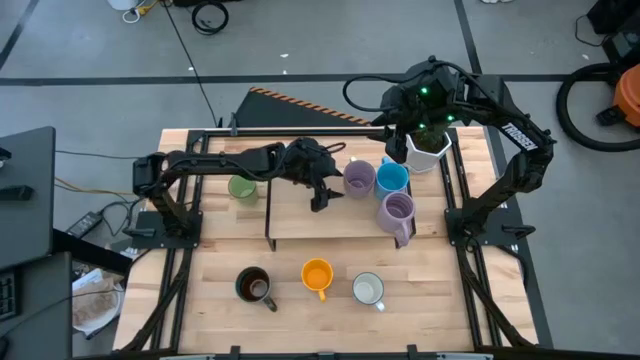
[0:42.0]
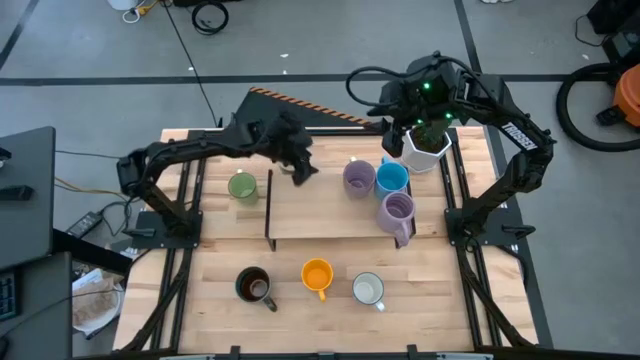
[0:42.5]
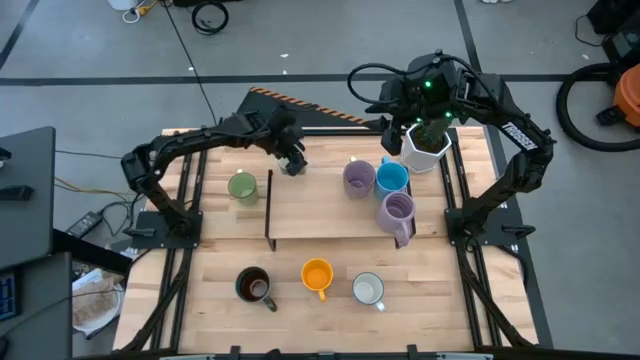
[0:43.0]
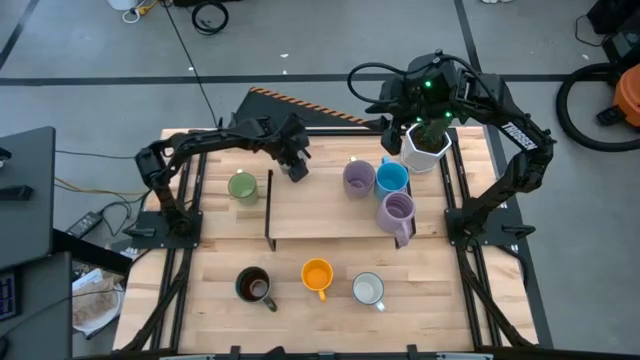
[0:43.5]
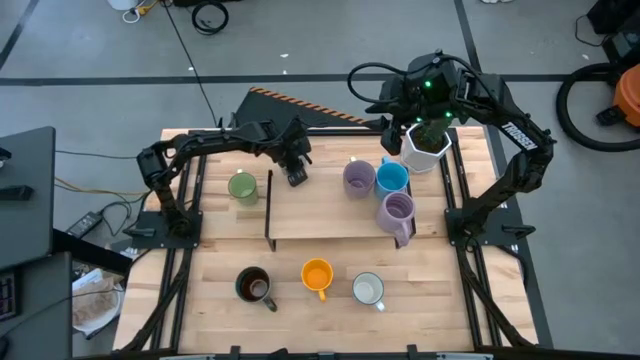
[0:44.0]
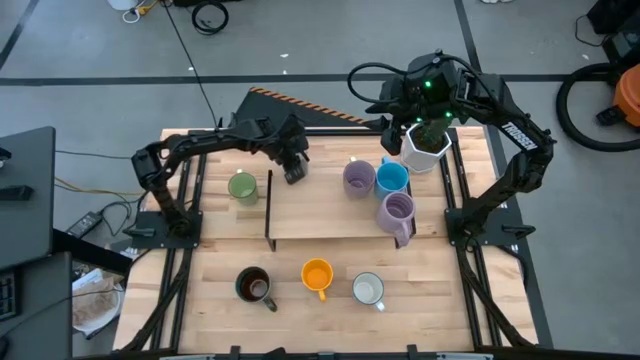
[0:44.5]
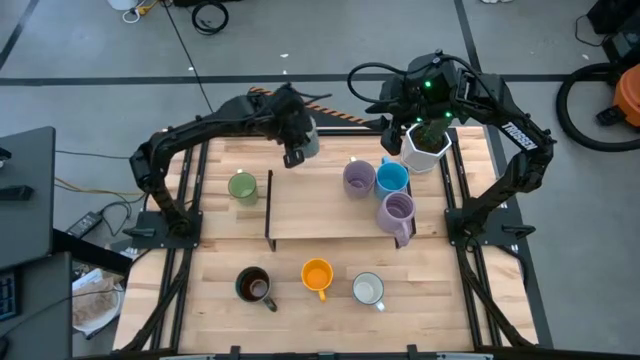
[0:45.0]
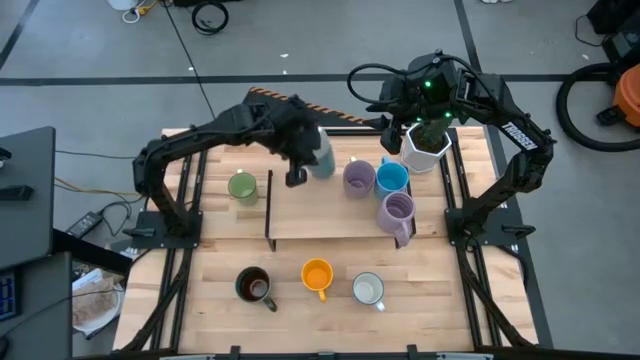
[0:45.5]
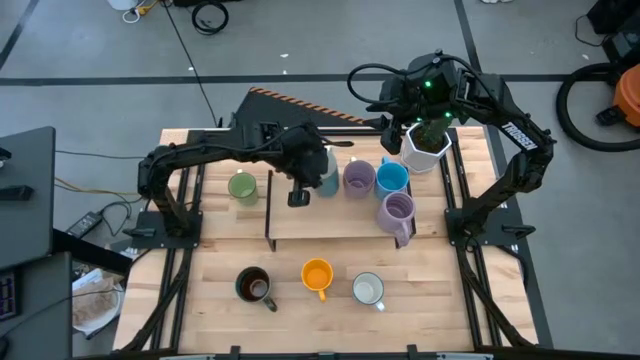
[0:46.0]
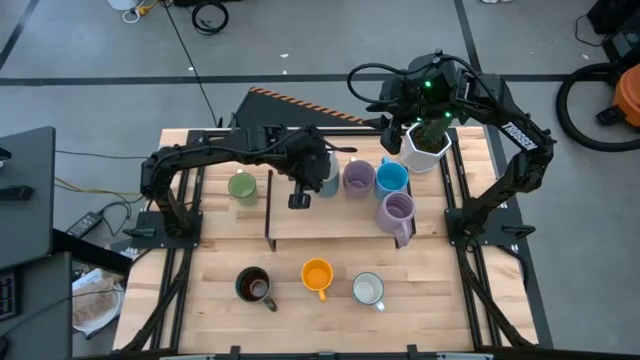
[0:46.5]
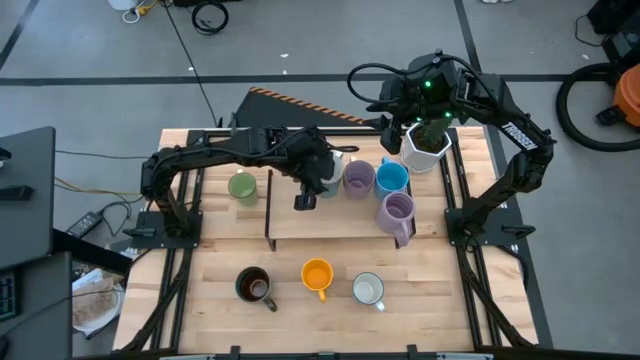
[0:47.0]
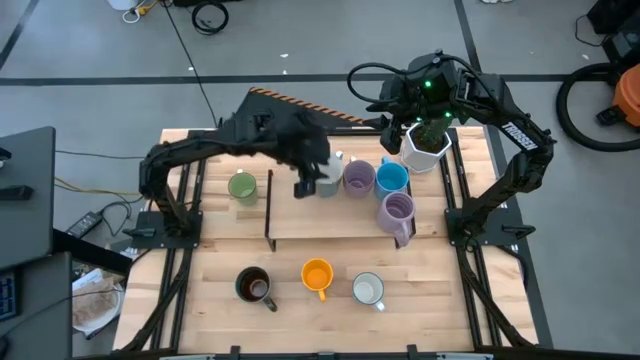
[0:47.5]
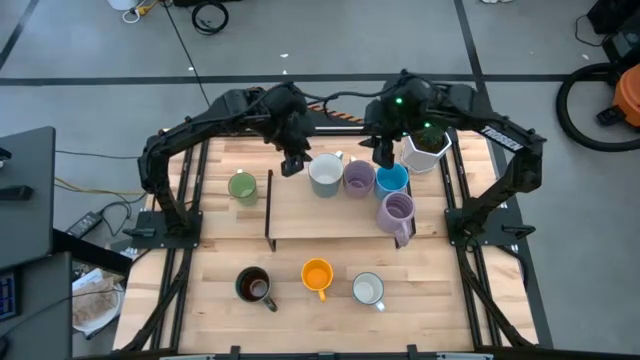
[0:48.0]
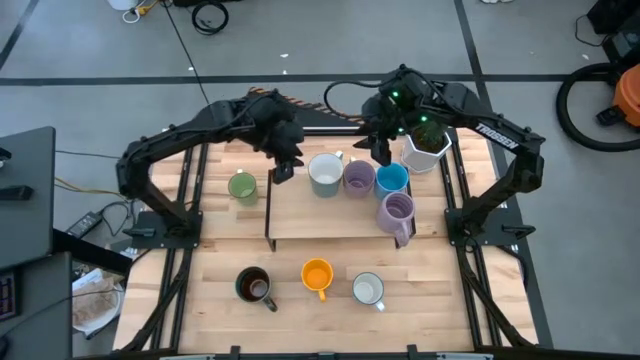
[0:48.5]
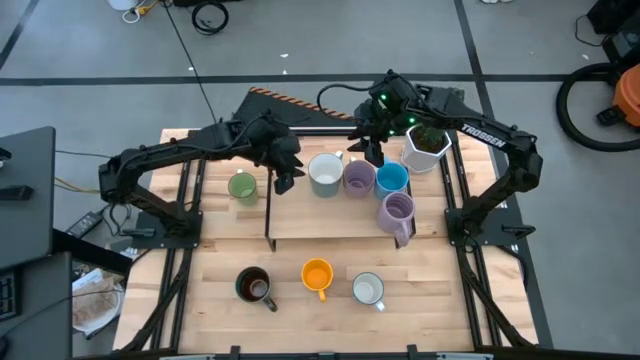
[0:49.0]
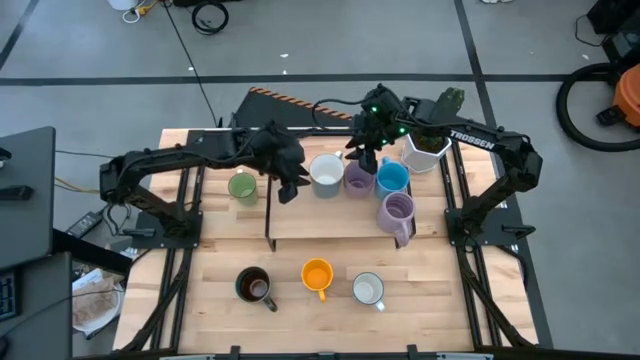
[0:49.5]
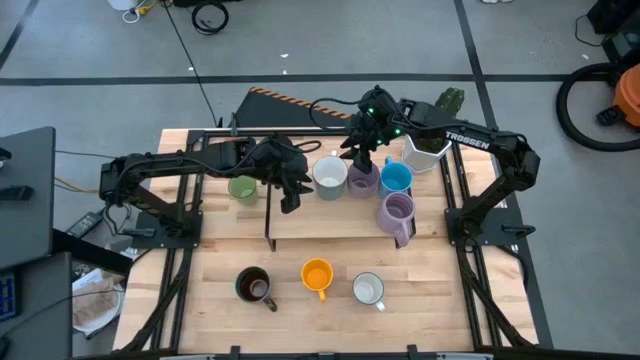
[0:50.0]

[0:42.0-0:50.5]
Task: Place coffee mugs
Put the light blue mug on the shelf

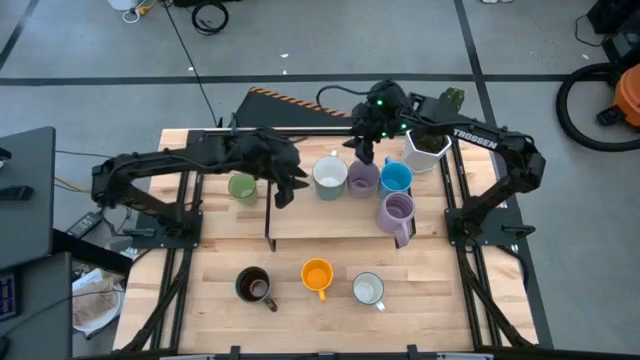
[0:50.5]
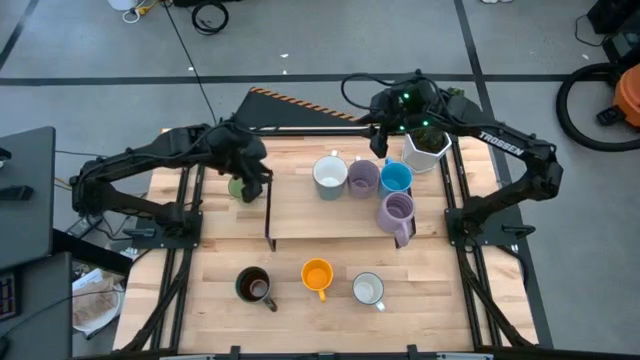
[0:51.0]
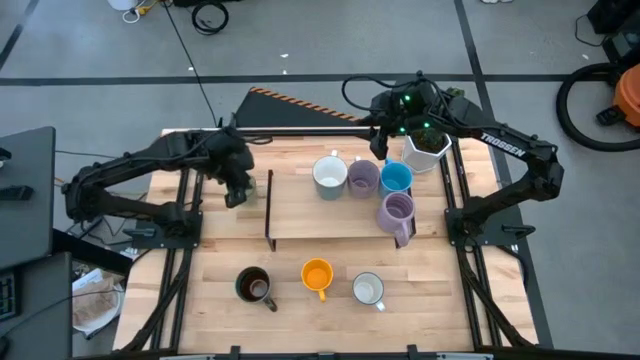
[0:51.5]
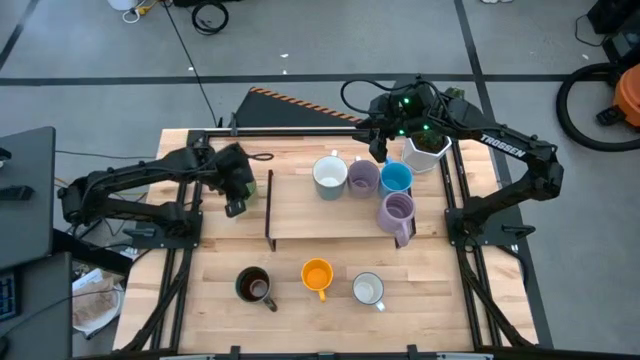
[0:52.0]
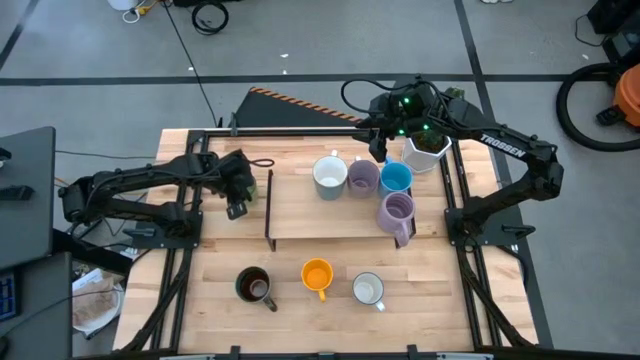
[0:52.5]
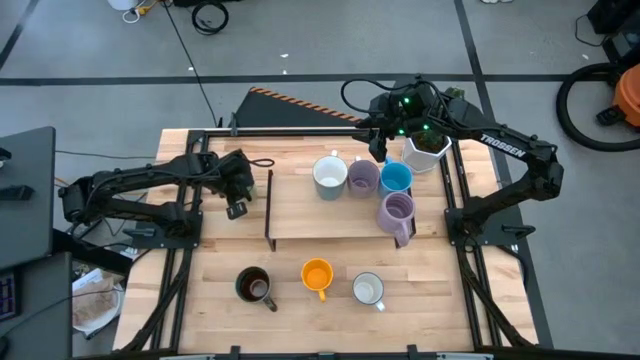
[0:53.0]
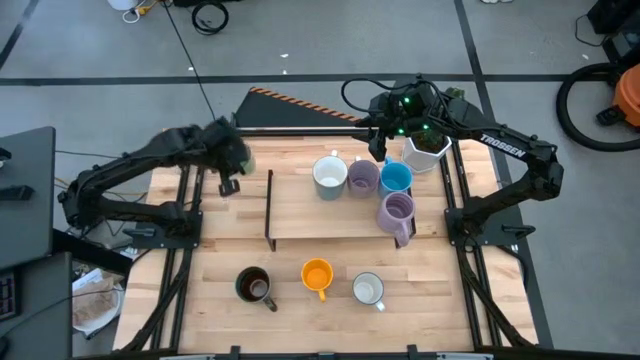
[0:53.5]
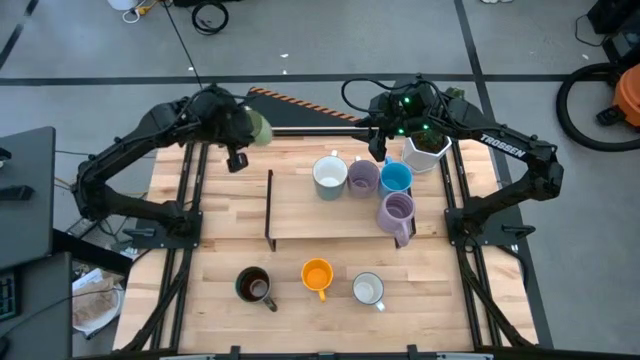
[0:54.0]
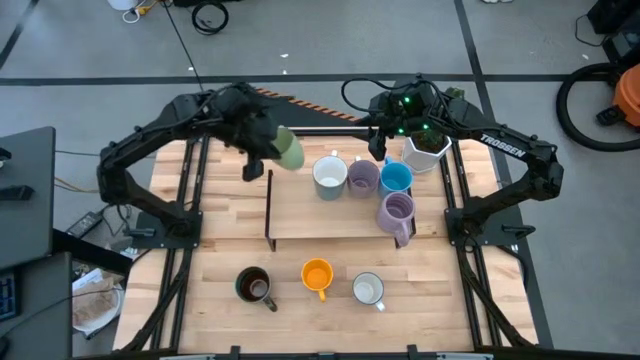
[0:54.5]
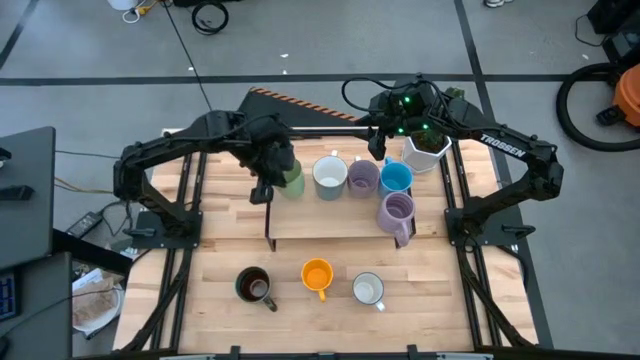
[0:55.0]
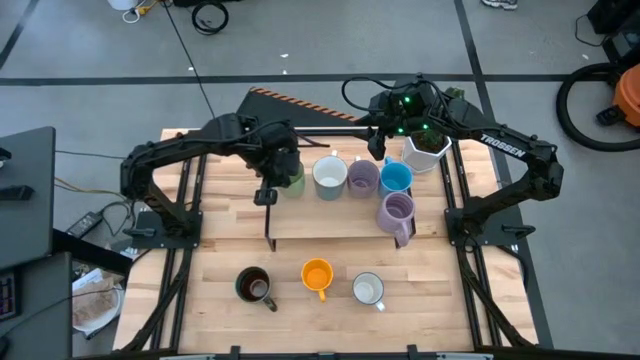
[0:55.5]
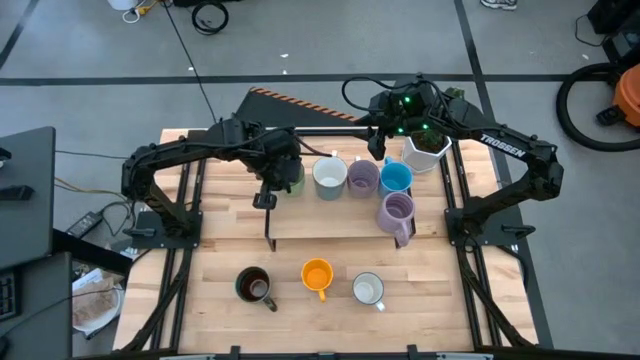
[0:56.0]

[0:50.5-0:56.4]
Put the green mug on the shelf

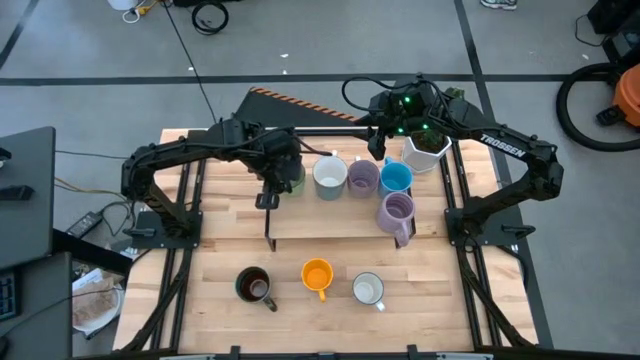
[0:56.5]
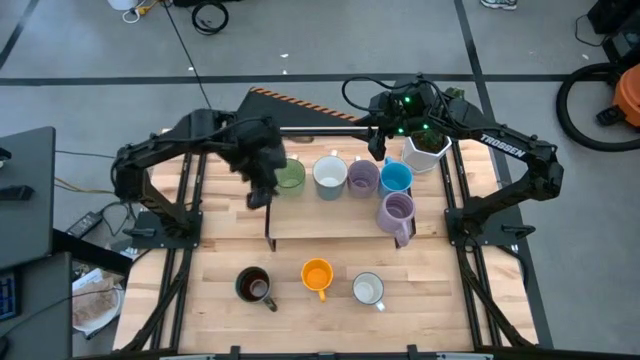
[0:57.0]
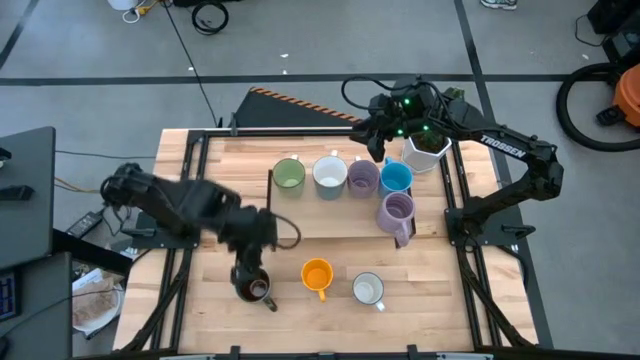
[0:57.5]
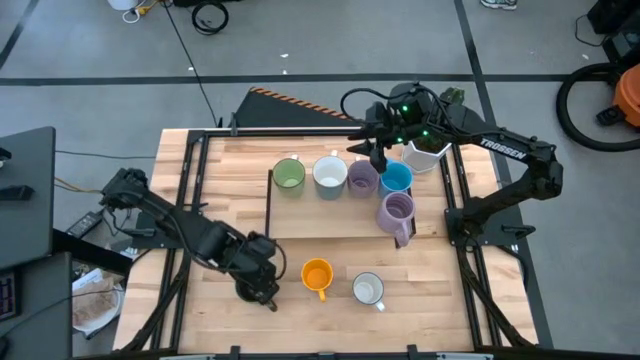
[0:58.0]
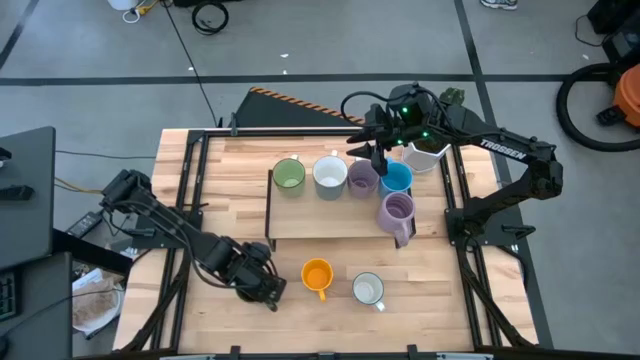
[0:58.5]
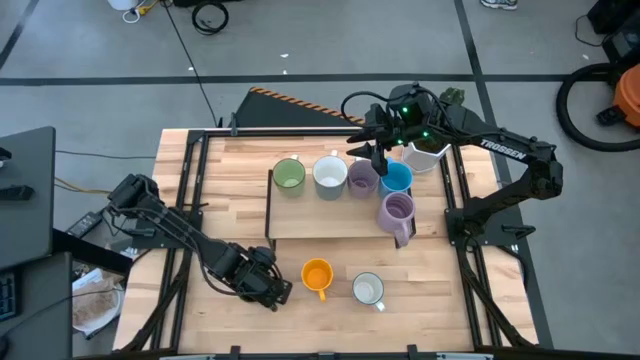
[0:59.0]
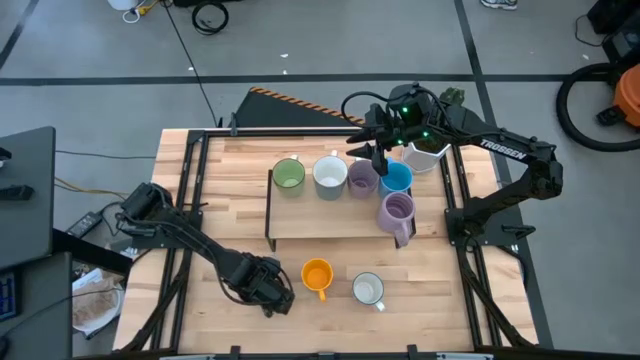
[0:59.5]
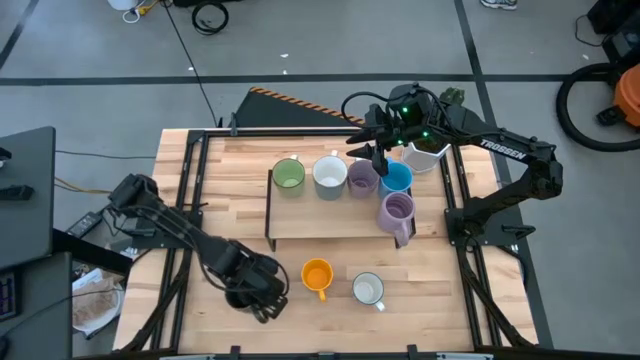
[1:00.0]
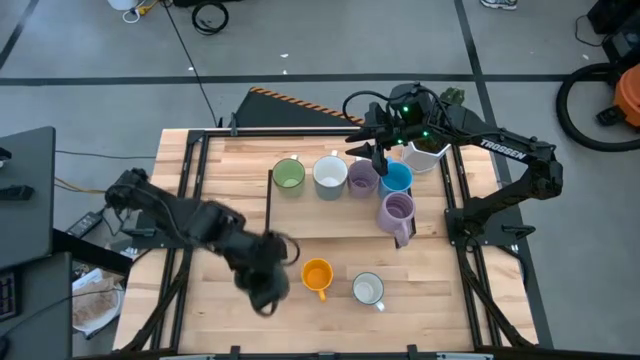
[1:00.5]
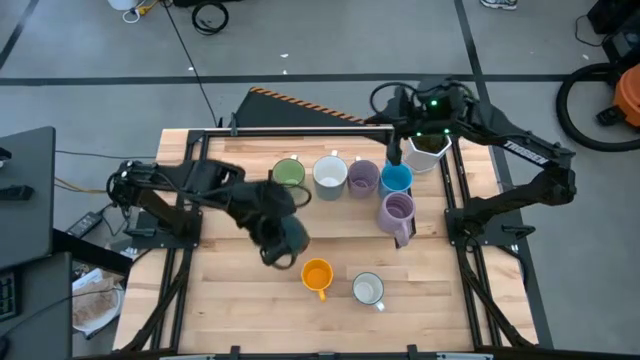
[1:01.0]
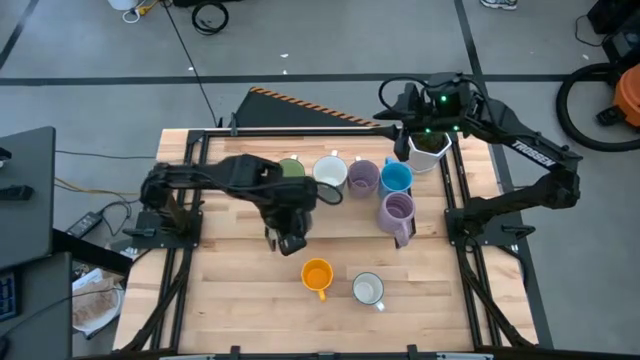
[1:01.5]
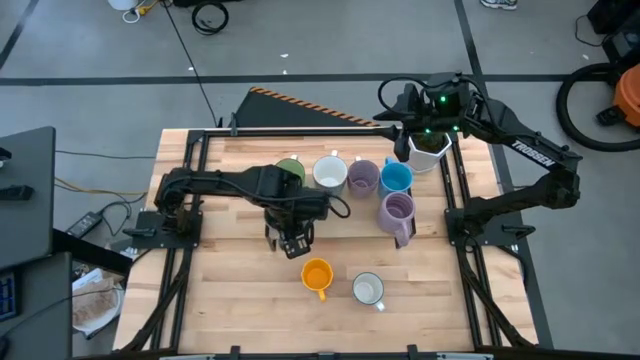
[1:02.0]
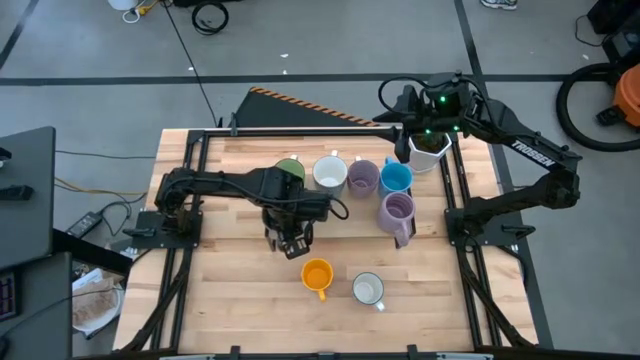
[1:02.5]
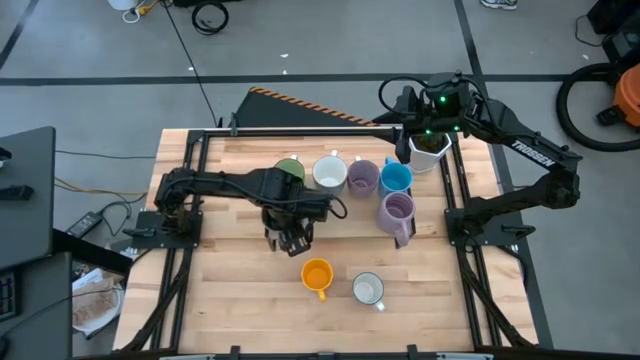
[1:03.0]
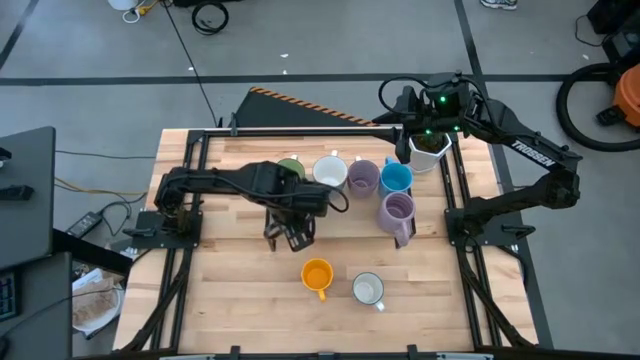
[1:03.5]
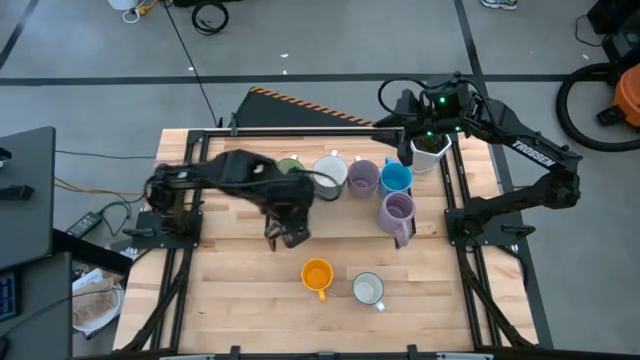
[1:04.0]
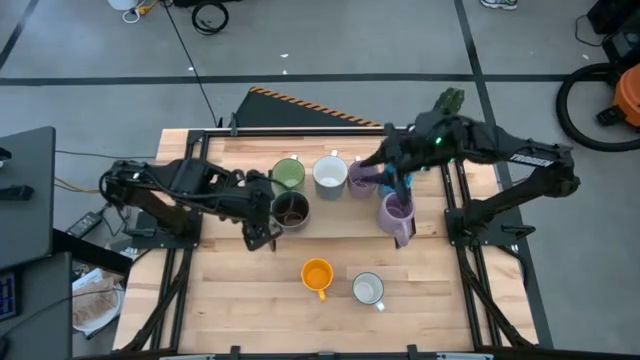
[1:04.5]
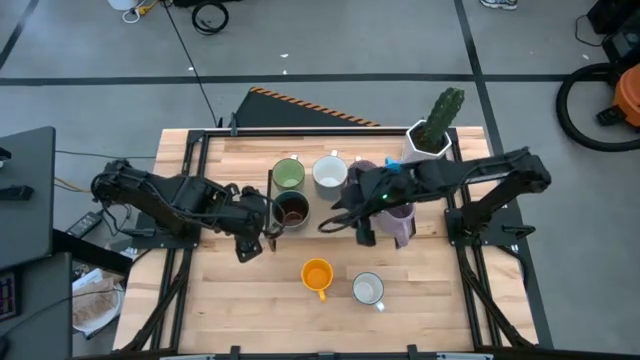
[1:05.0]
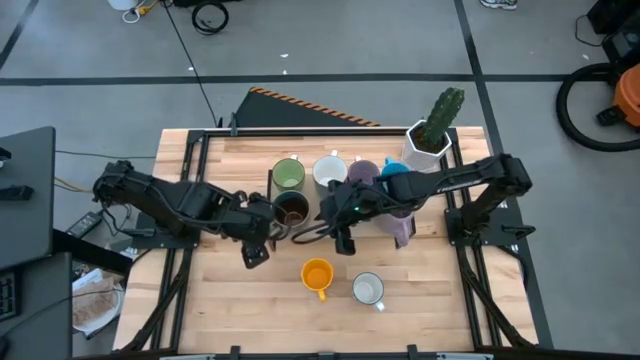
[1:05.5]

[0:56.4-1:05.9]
Put the brown blue mug on the shelf
